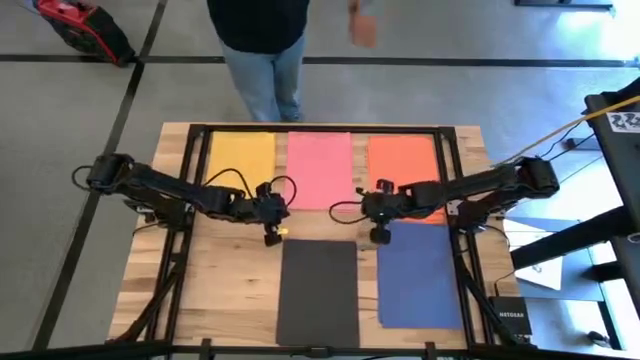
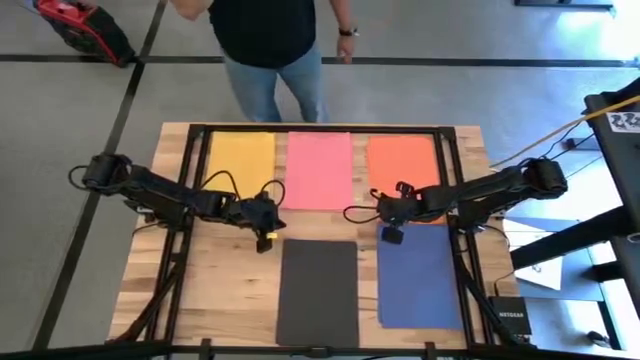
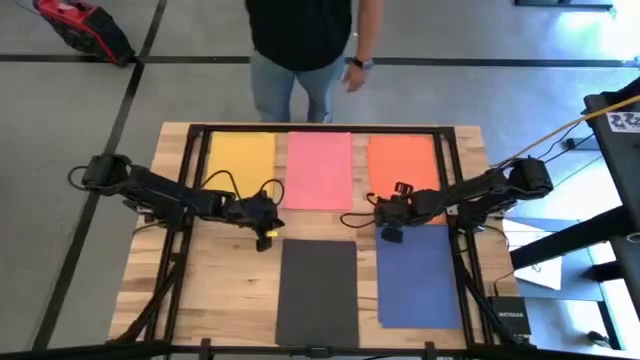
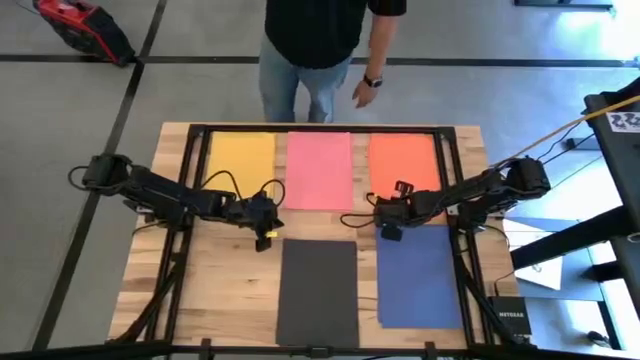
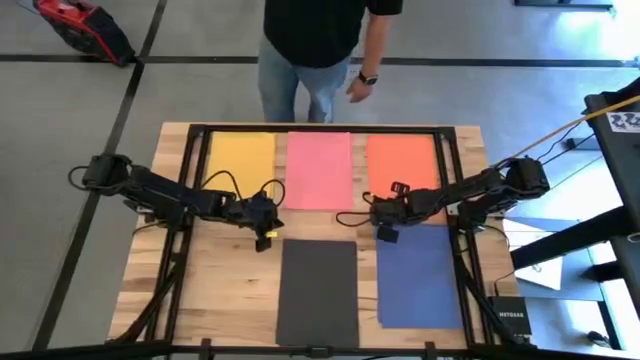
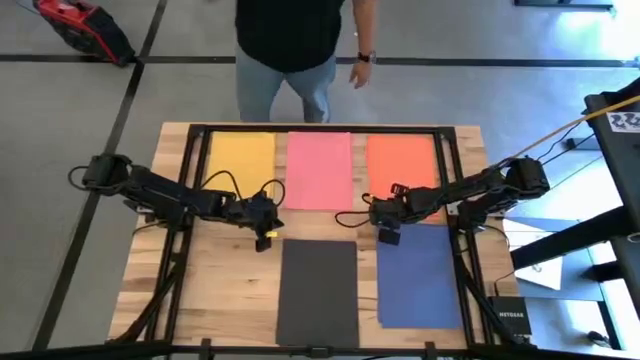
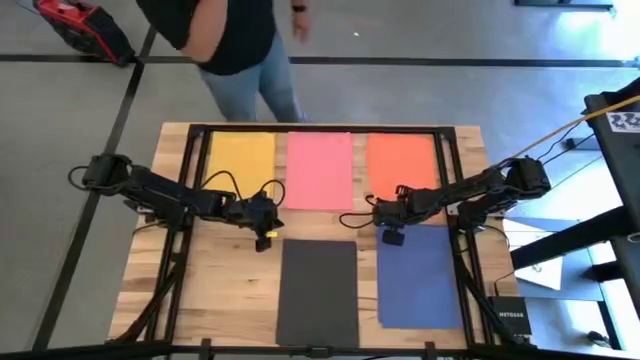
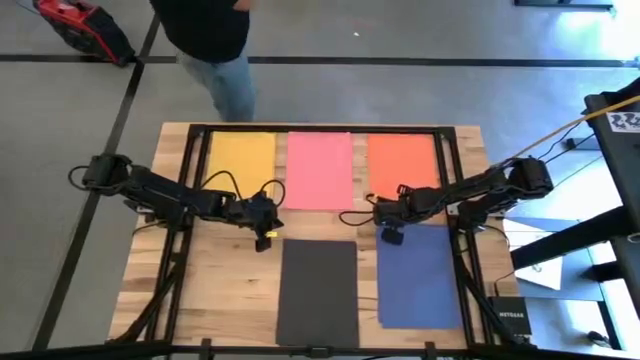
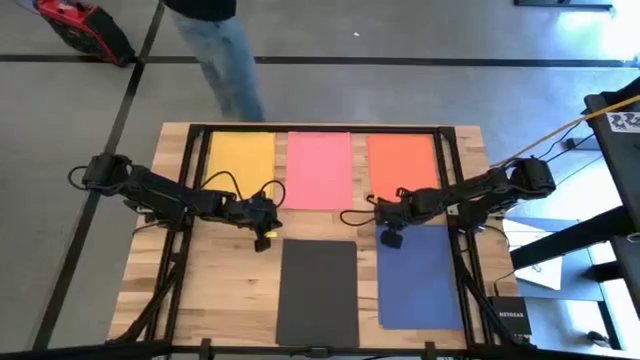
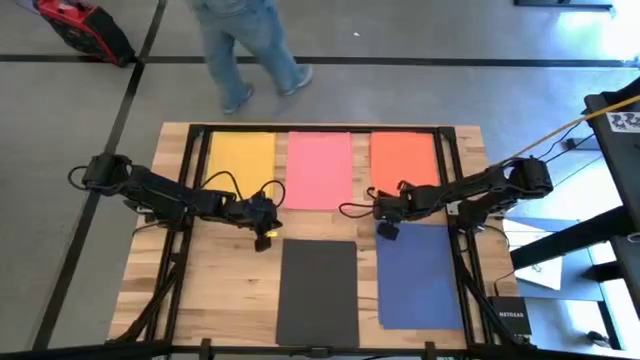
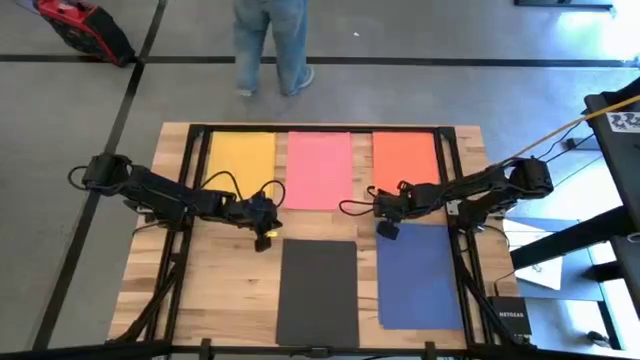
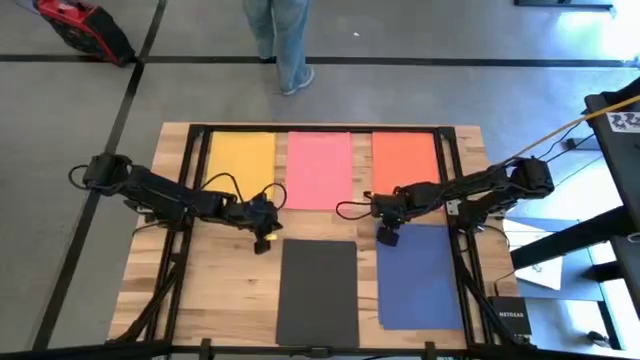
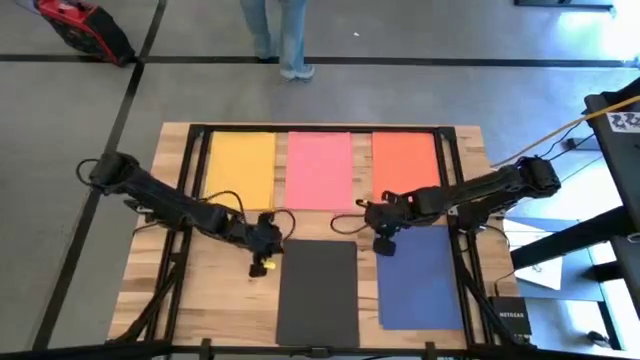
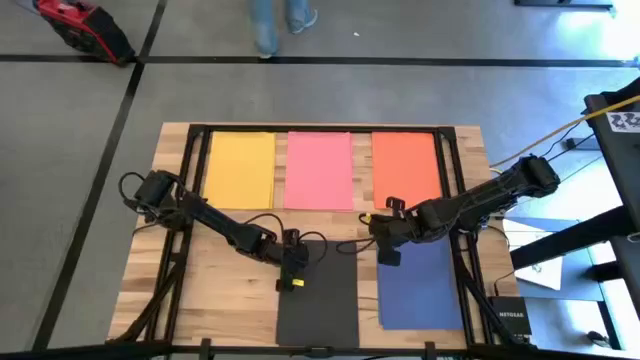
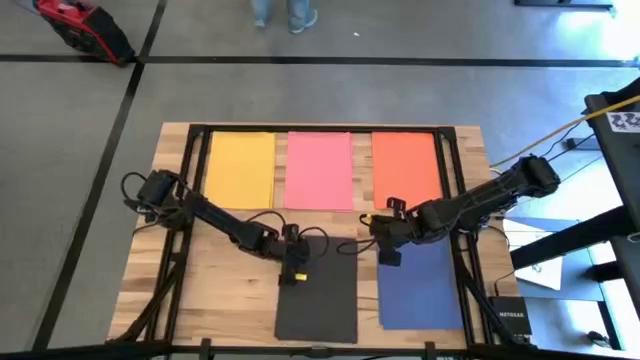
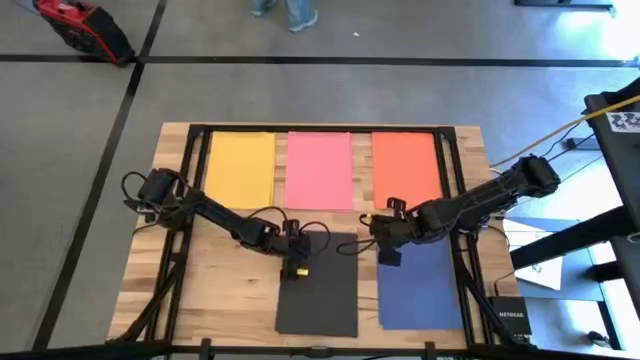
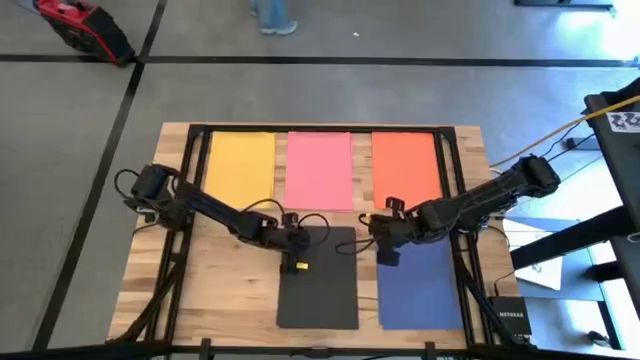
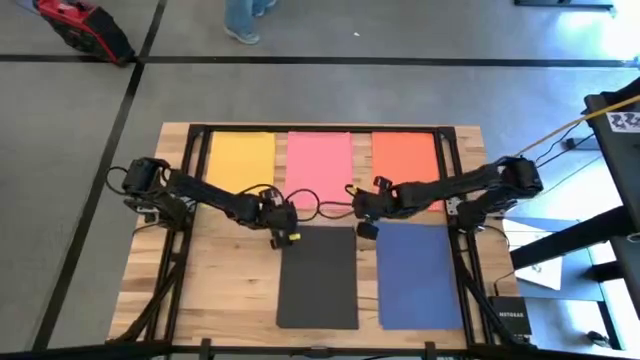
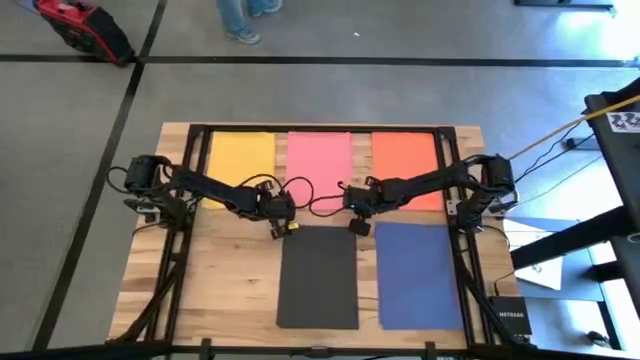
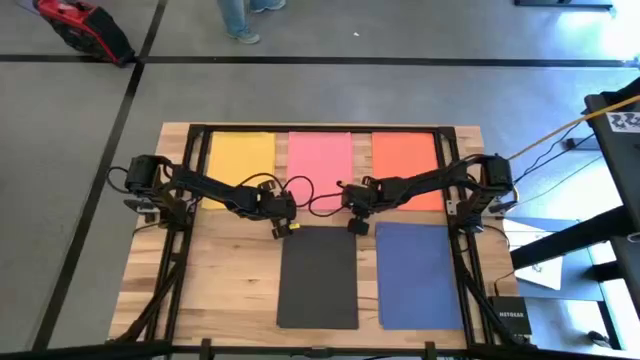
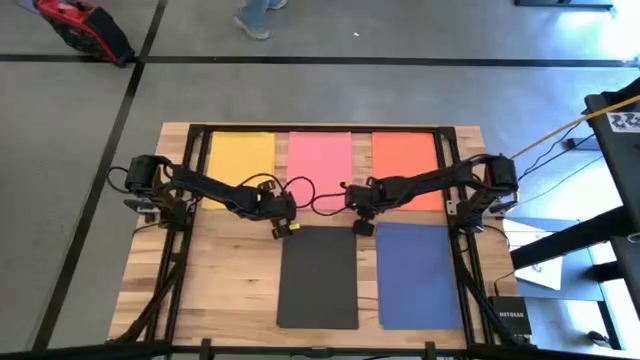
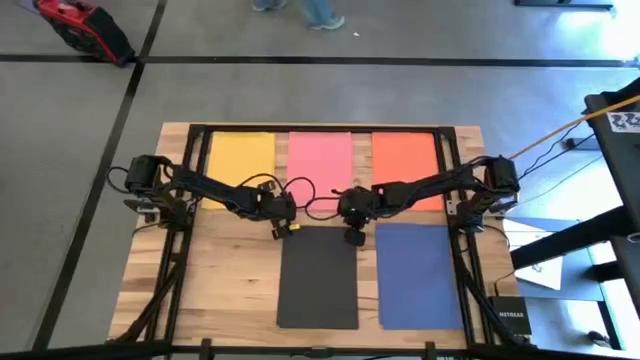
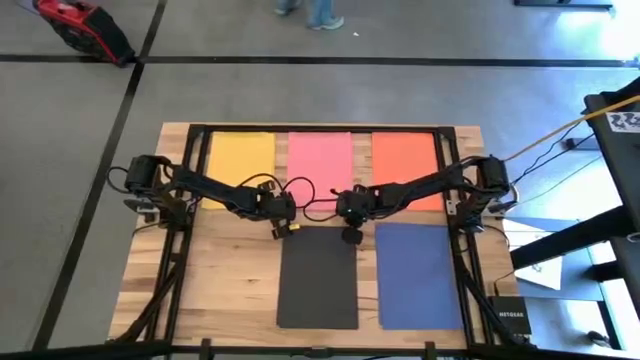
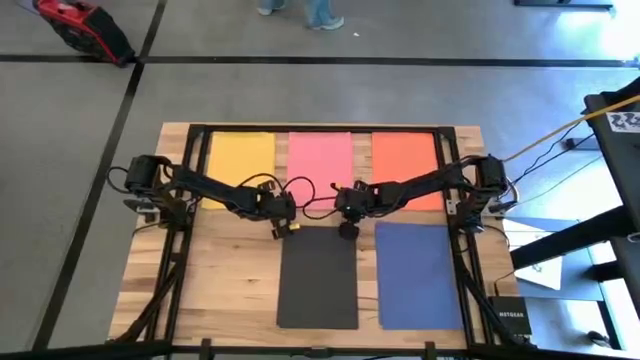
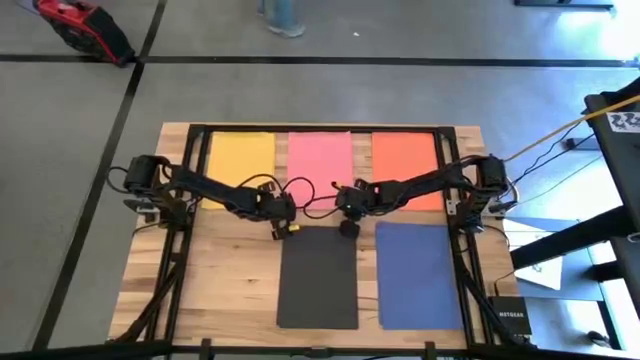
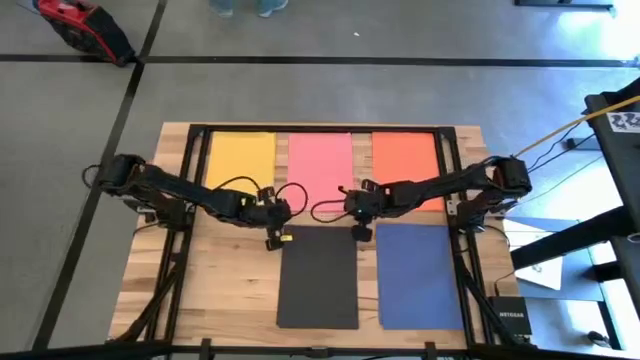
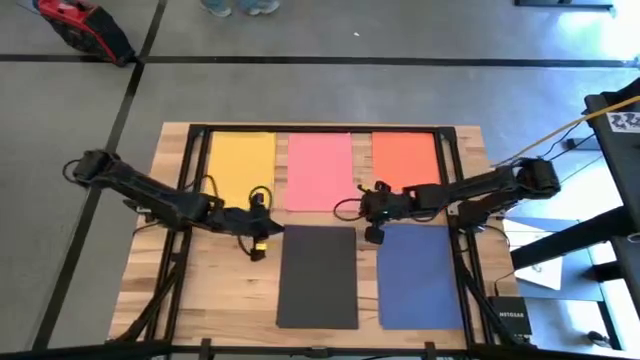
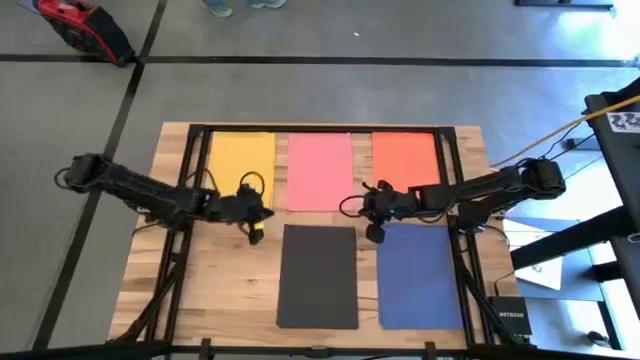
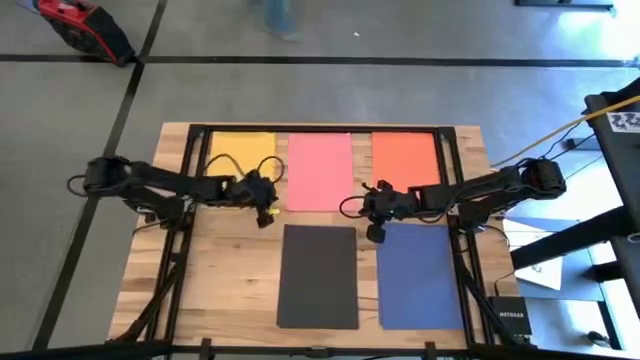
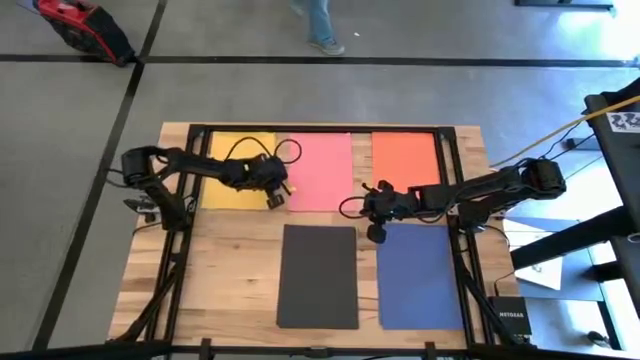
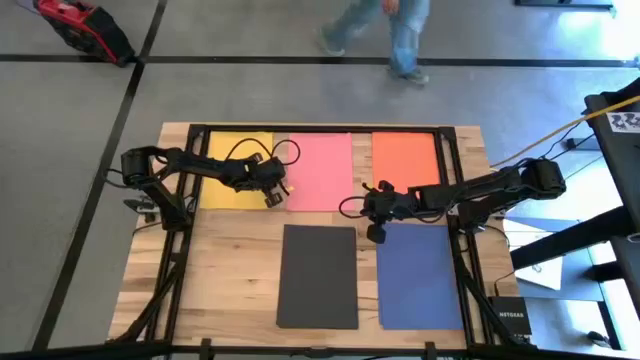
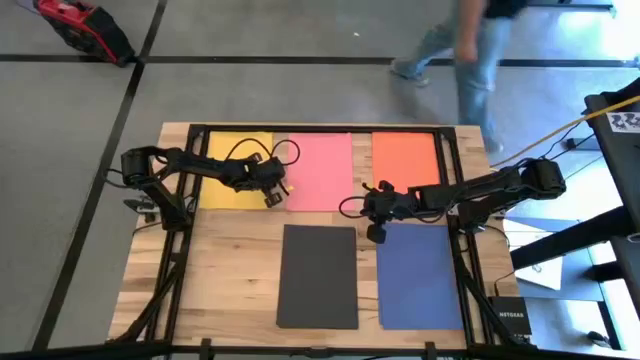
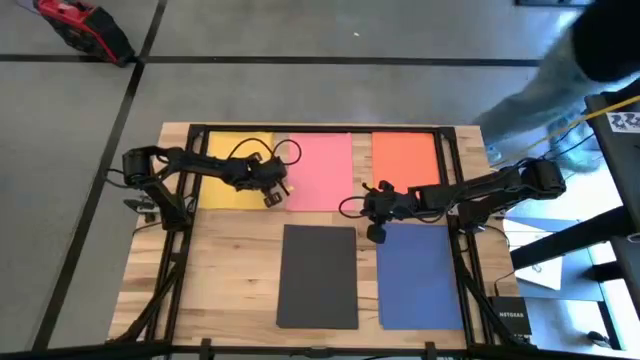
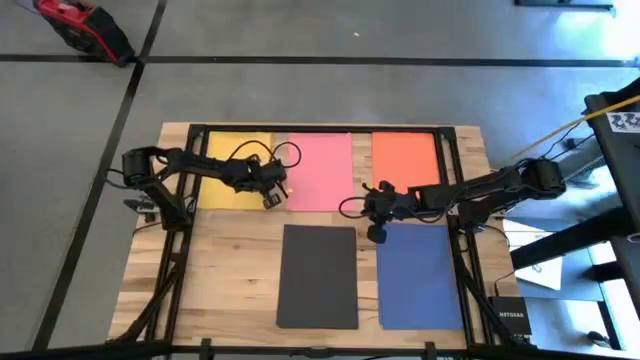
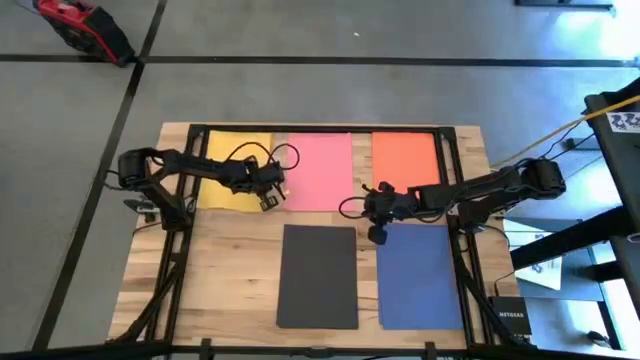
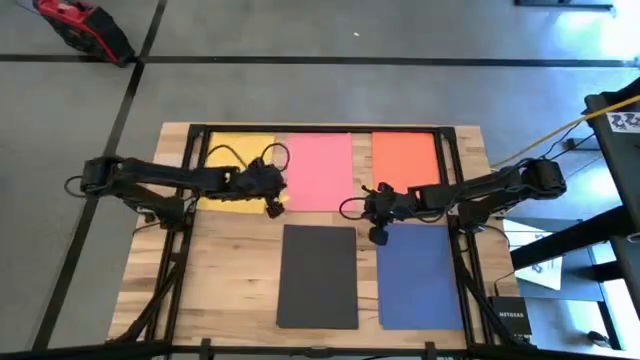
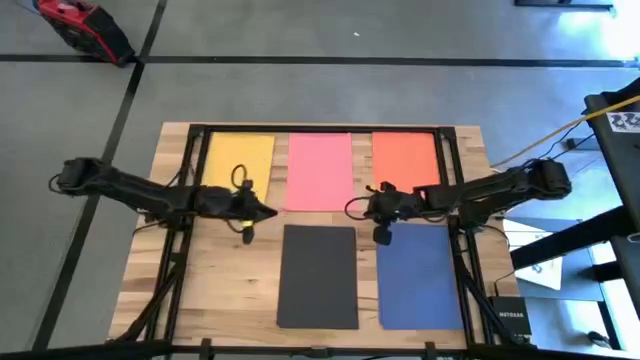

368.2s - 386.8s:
Task: Organize paper
Adjust the papers on the table

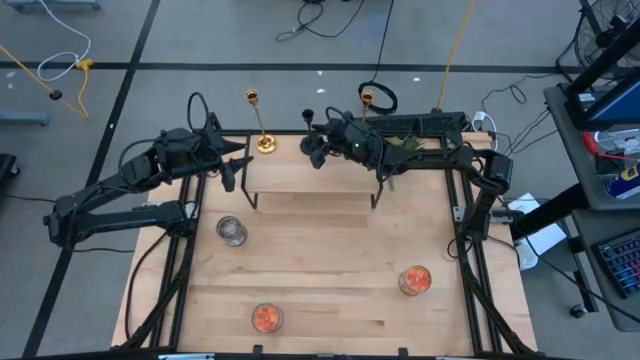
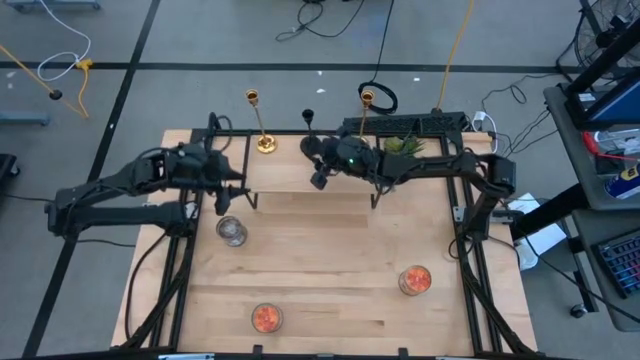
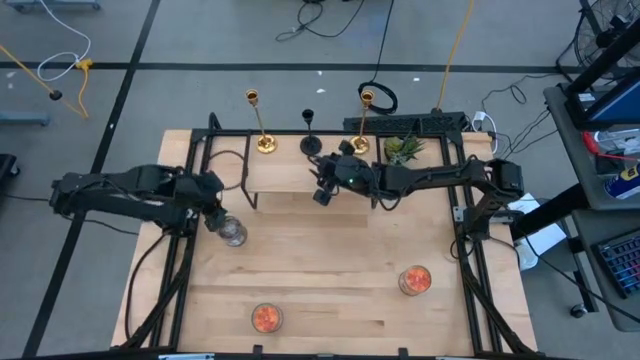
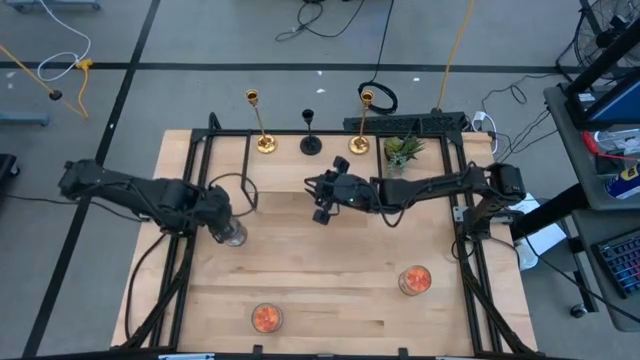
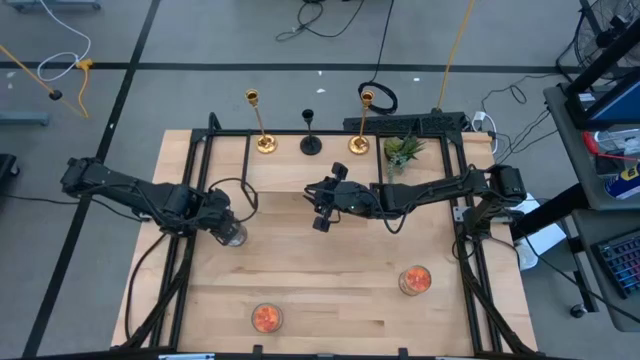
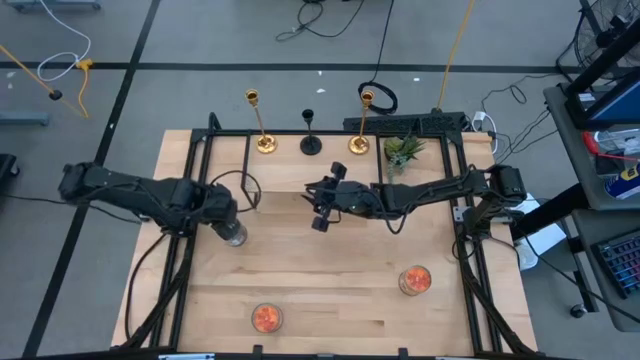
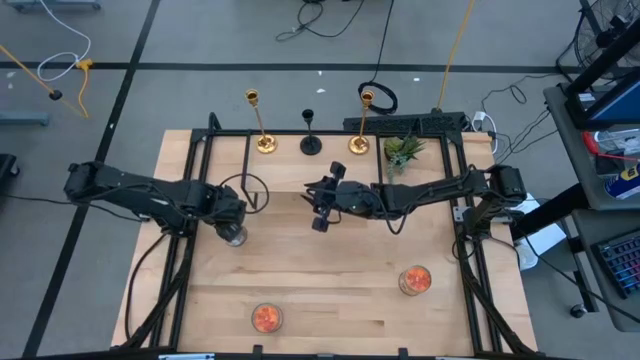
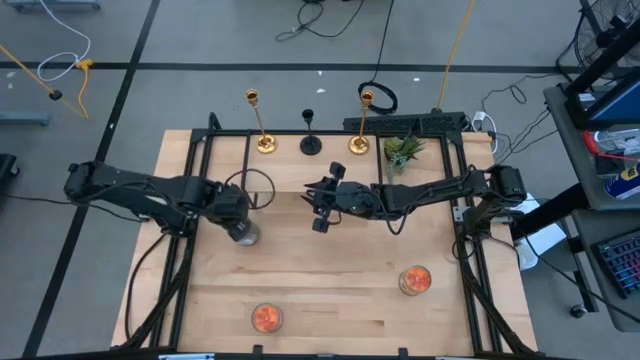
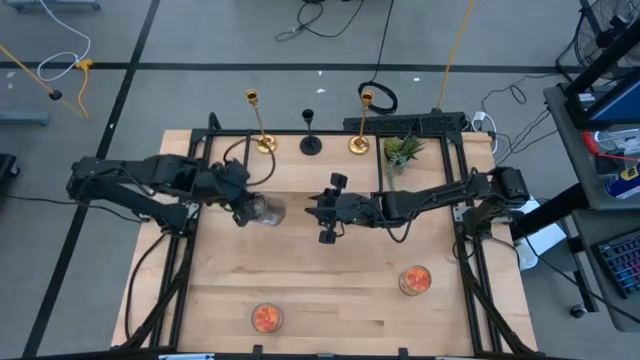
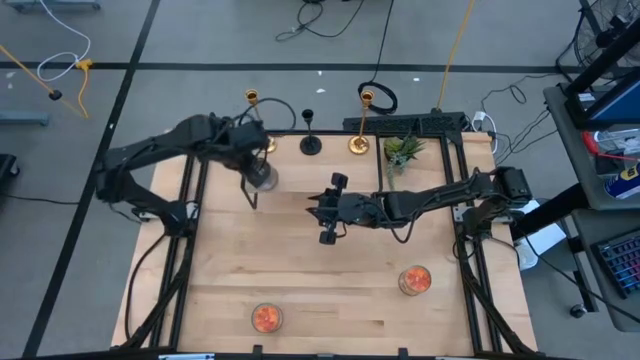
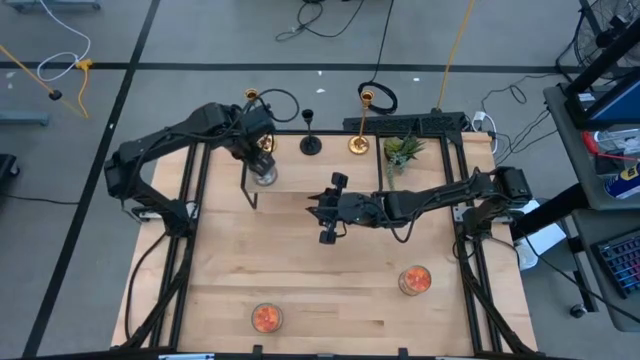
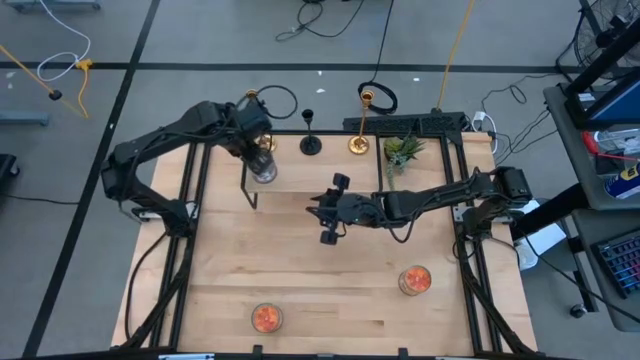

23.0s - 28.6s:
Task: Pick & Place candle stick holders
Put the brown scented candle on the shelf
